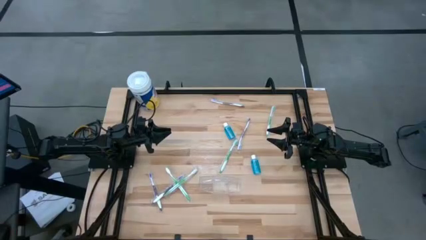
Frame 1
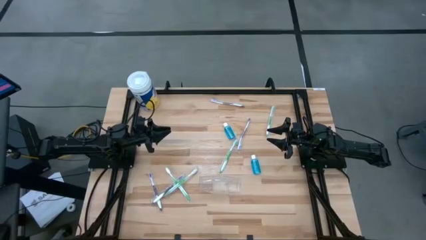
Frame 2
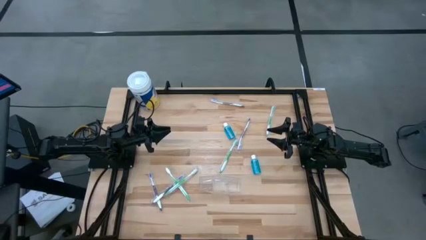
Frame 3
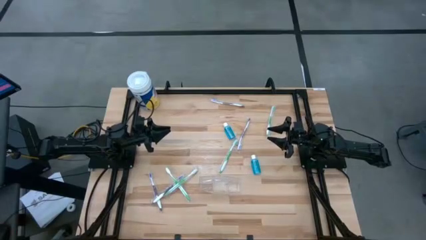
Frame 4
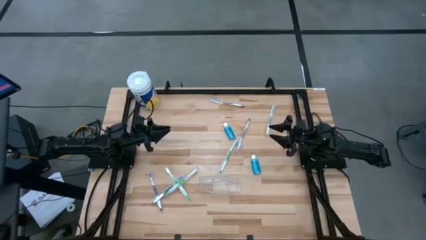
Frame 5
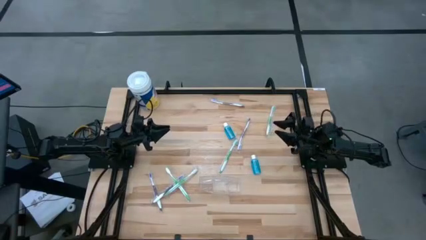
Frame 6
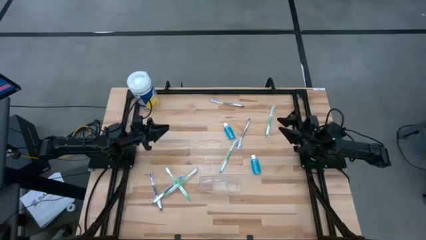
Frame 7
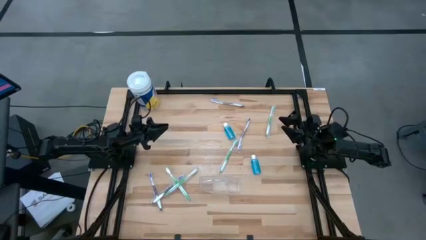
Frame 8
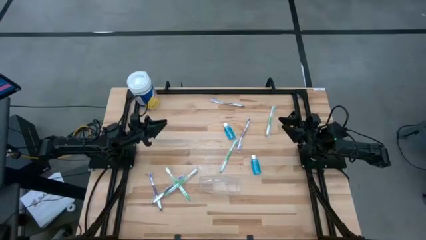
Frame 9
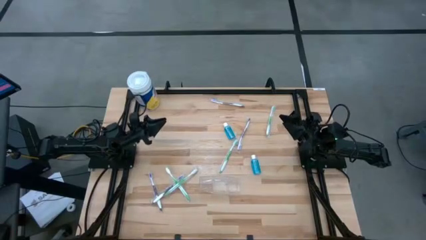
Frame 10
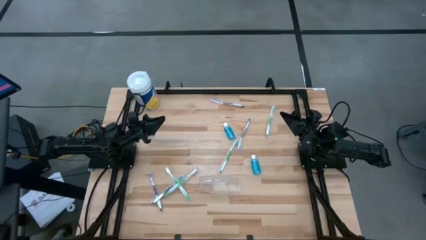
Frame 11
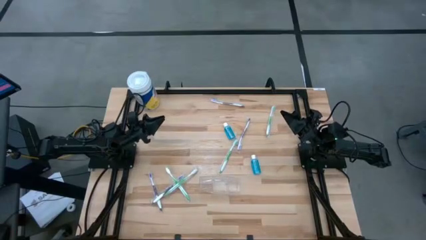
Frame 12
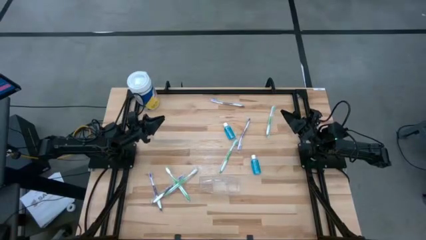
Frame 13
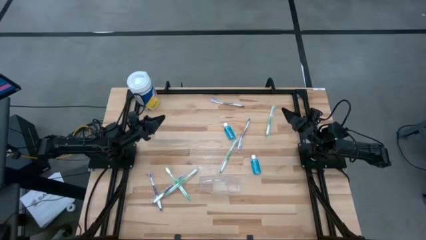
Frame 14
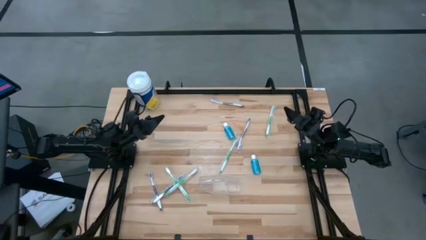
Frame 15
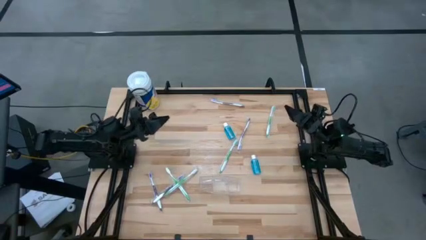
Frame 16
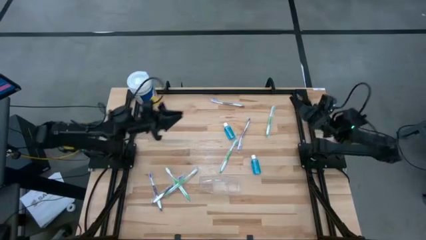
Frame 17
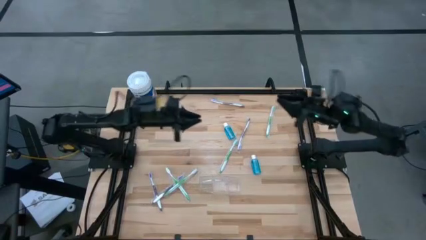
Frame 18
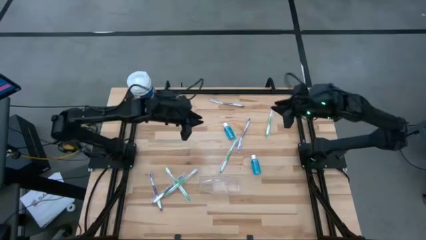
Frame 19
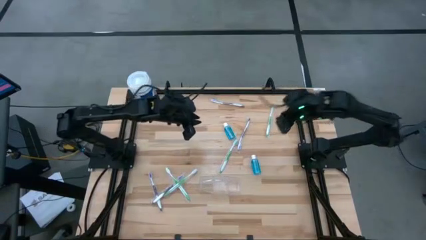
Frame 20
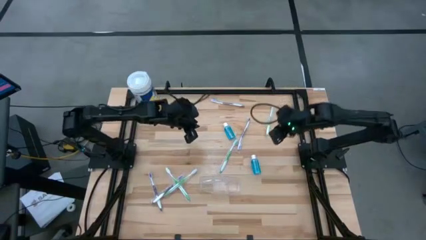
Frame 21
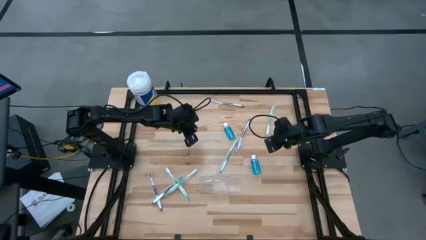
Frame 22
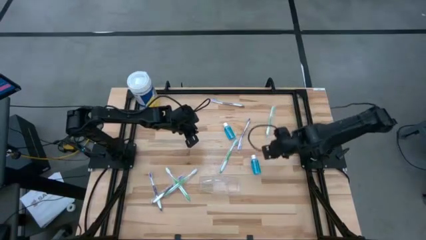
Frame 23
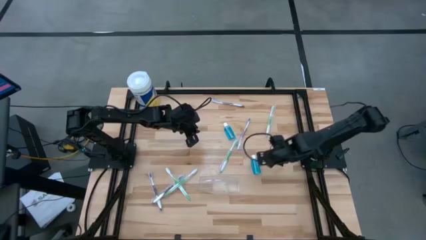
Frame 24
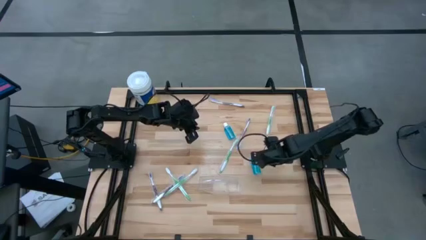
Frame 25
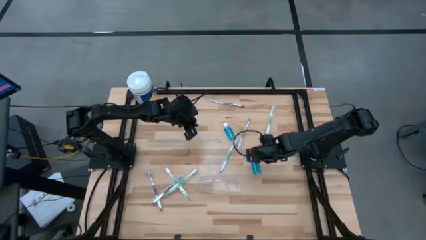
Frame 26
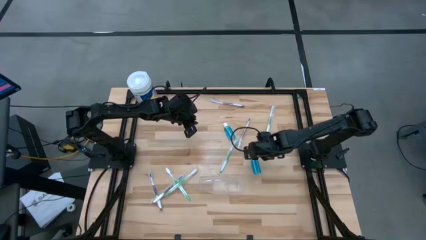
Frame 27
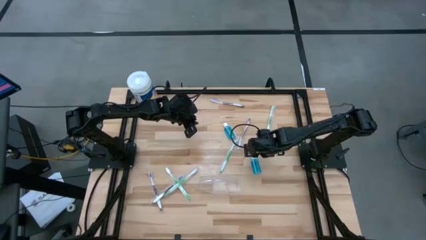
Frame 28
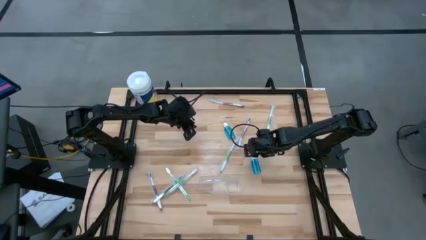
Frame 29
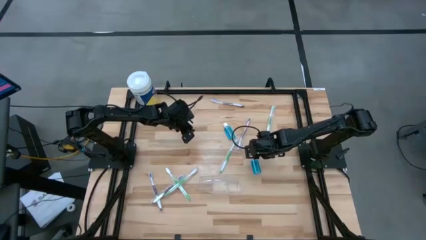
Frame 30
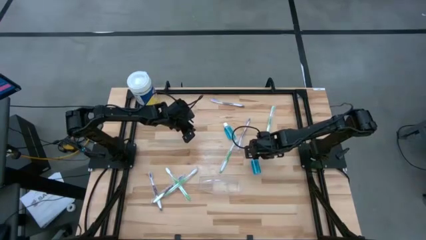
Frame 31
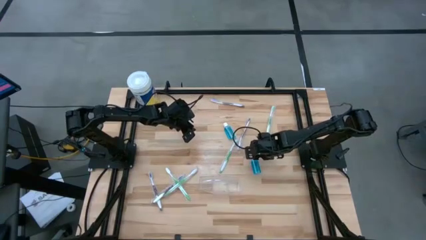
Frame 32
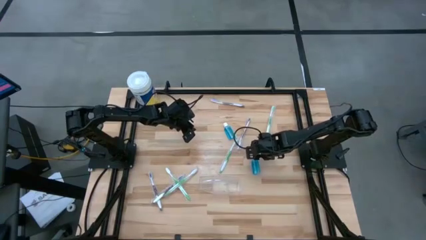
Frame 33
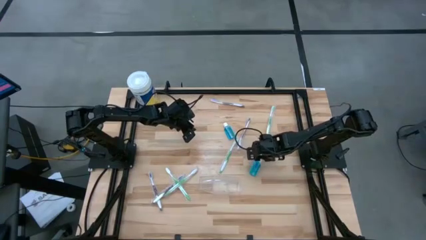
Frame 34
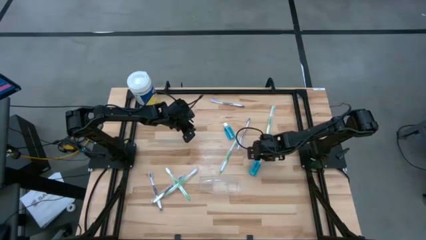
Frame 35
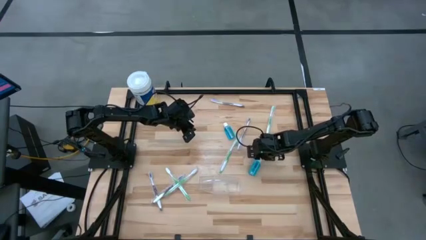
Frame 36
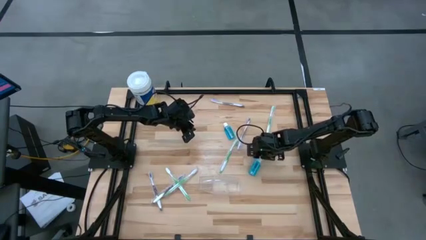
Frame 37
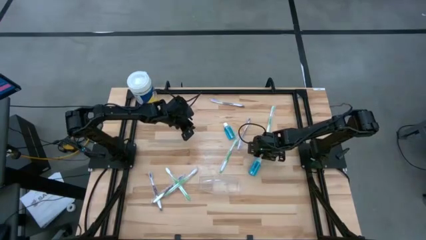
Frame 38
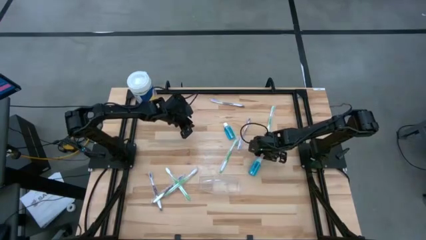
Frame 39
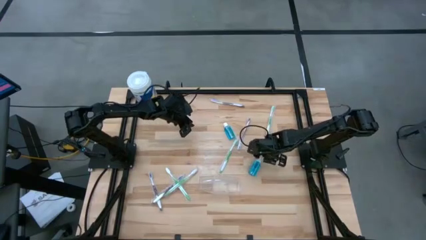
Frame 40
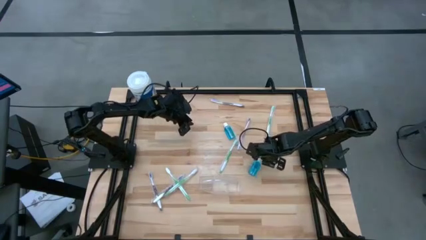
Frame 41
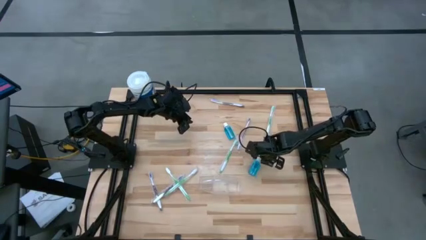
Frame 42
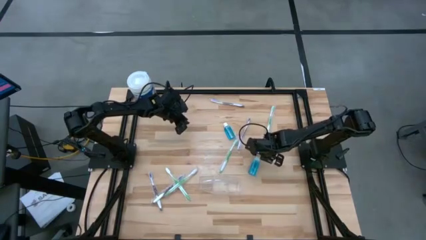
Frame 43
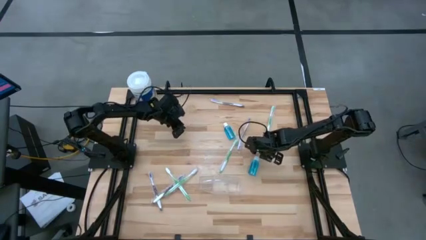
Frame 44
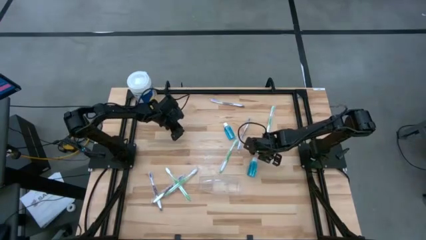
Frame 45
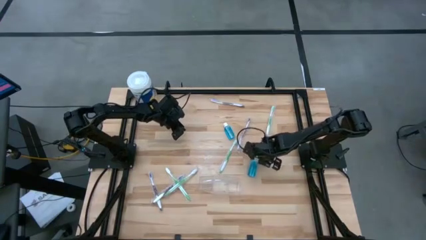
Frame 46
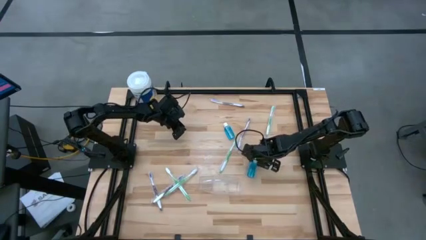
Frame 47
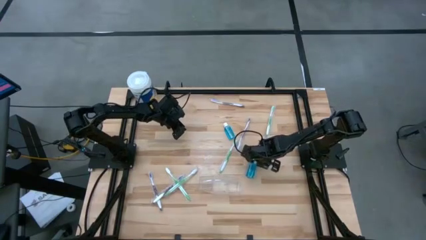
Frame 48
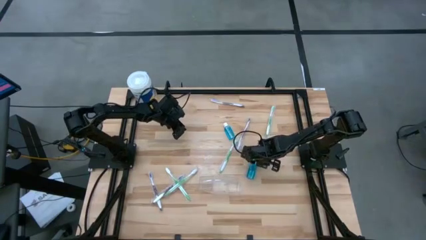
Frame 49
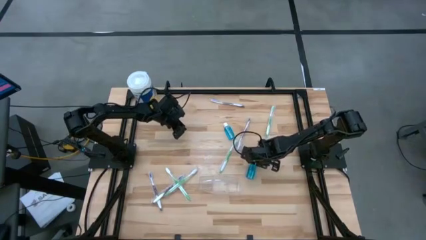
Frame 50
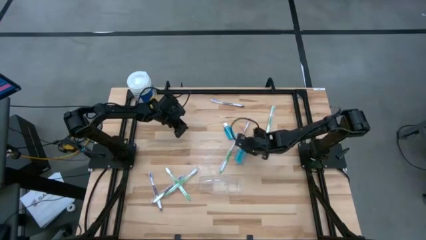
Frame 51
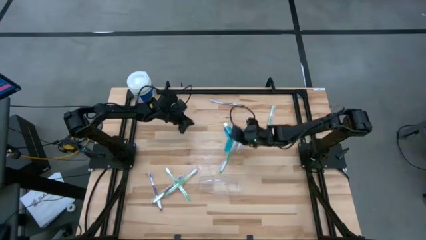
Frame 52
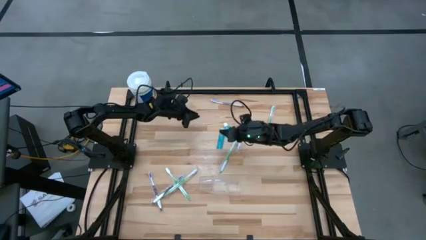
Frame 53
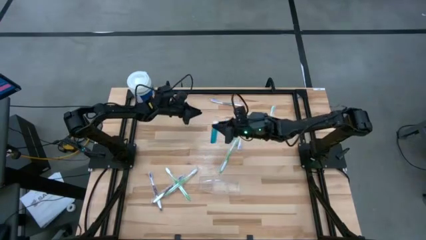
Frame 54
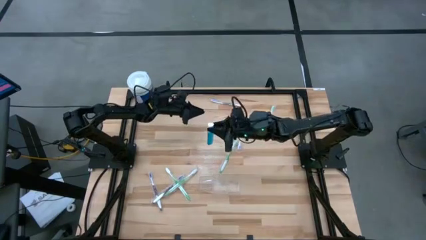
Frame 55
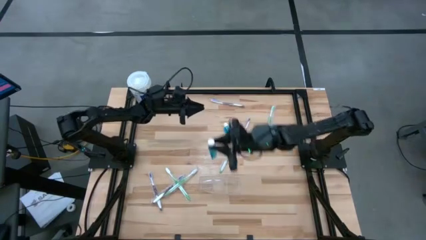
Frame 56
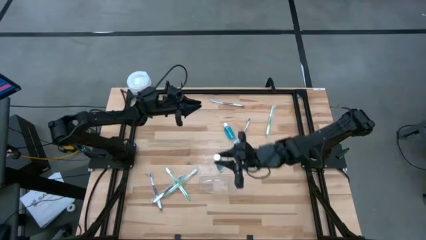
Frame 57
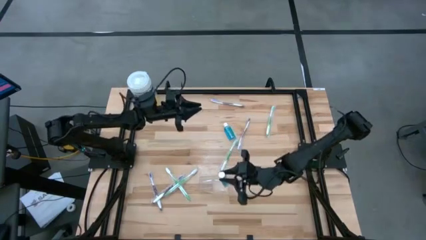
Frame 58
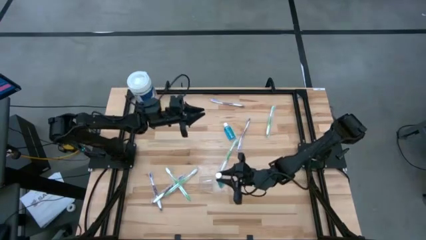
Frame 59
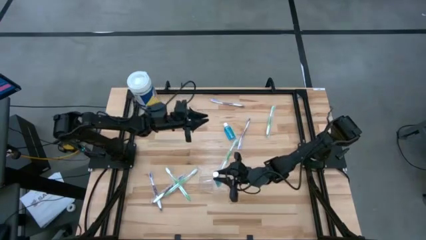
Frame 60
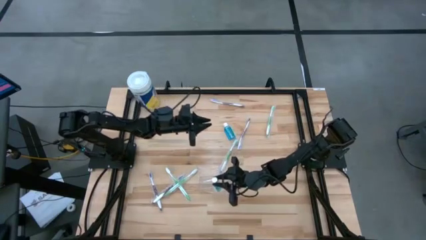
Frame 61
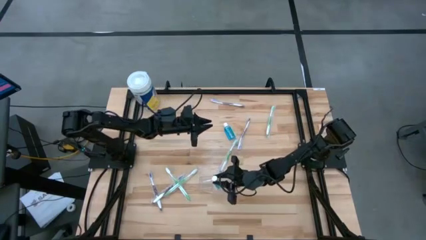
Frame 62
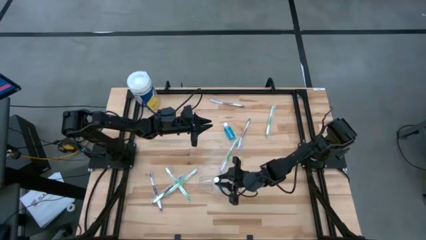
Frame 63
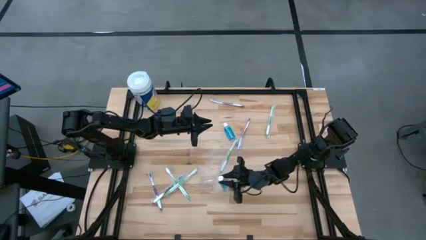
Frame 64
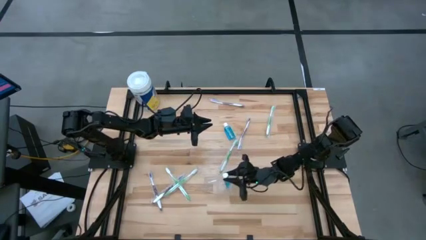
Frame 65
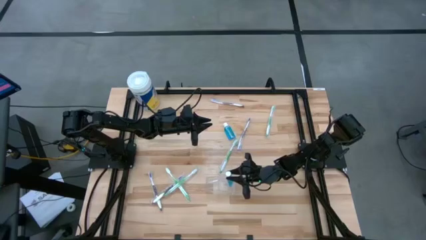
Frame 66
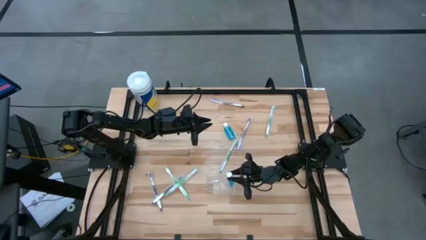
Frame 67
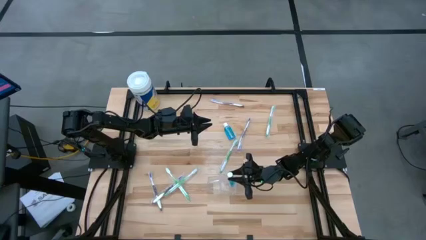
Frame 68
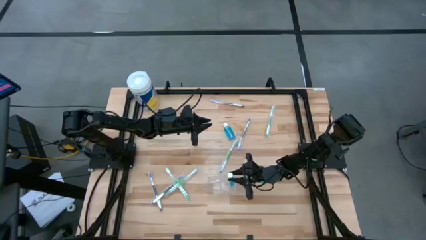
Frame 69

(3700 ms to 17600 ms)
Task: Pick & Place toothbrushing station
Put the blue mouthwash bottle in the transparent organizer
